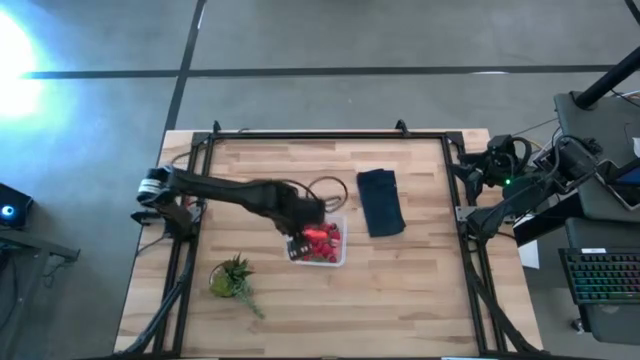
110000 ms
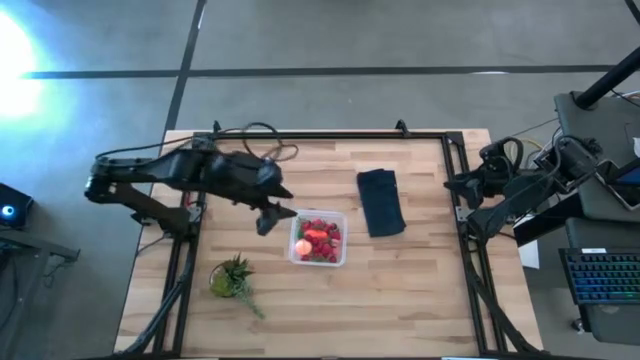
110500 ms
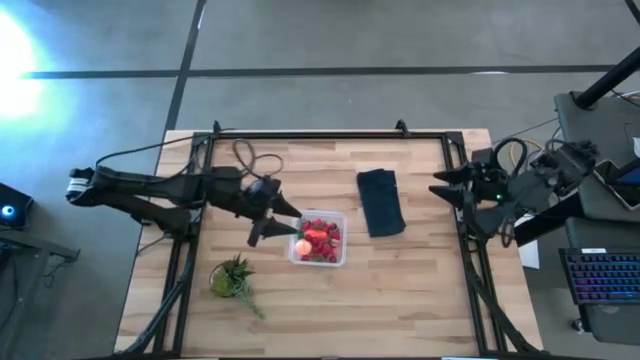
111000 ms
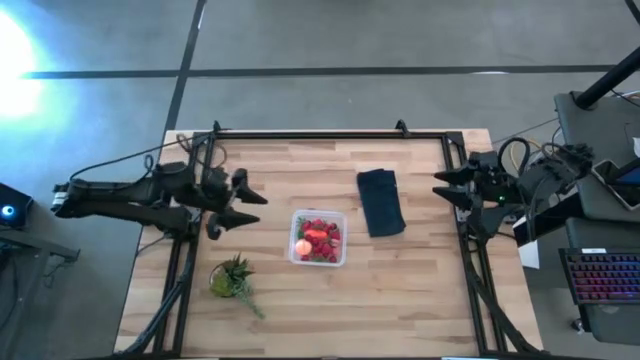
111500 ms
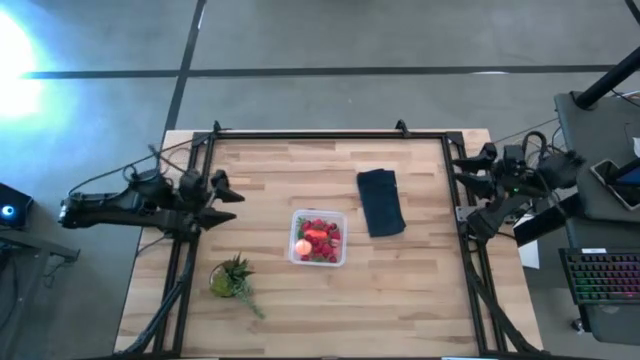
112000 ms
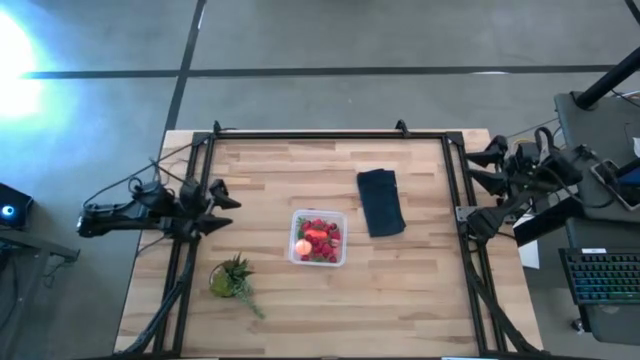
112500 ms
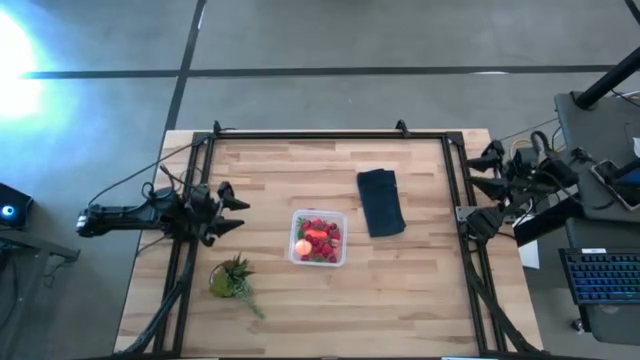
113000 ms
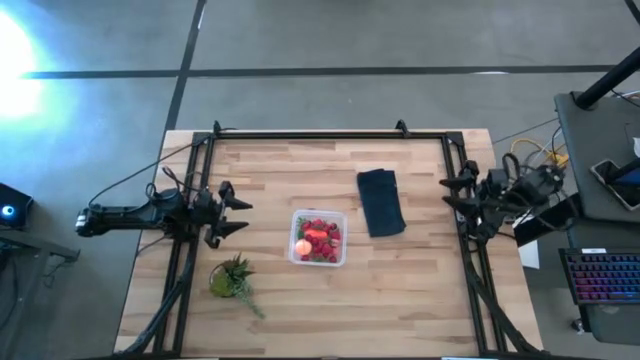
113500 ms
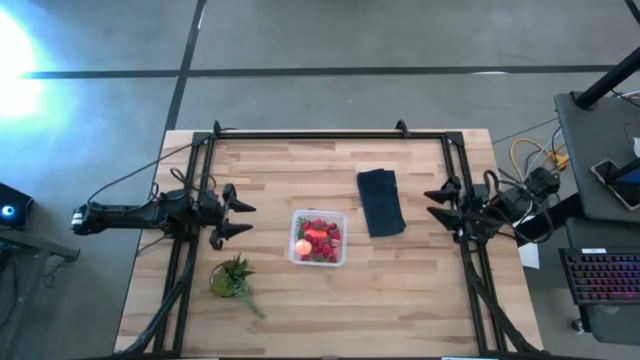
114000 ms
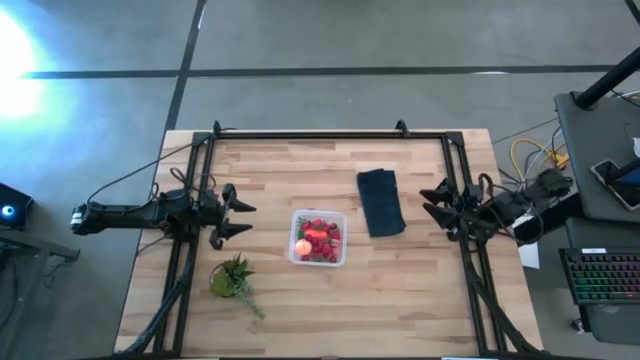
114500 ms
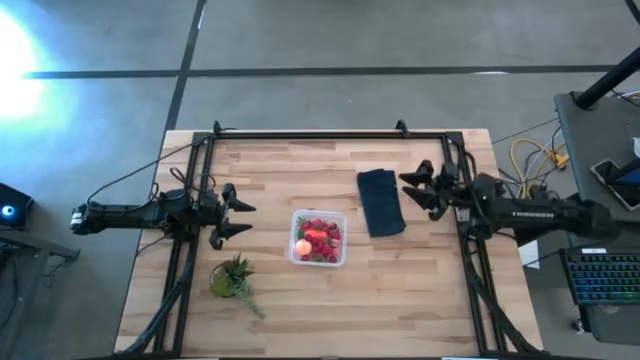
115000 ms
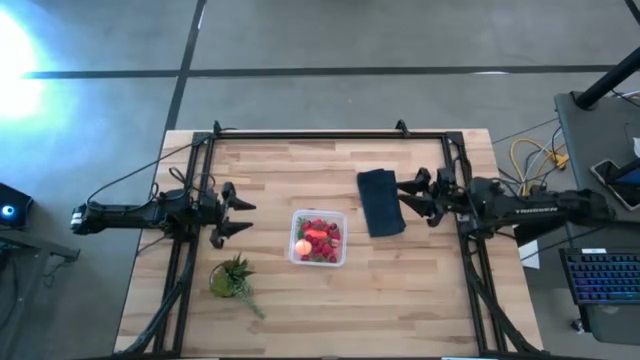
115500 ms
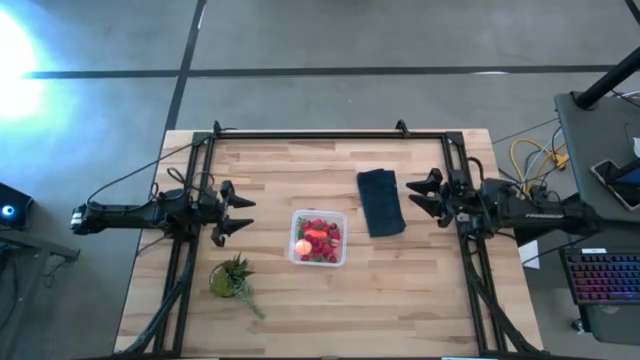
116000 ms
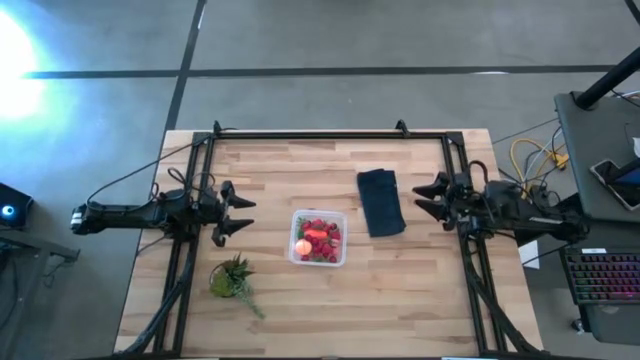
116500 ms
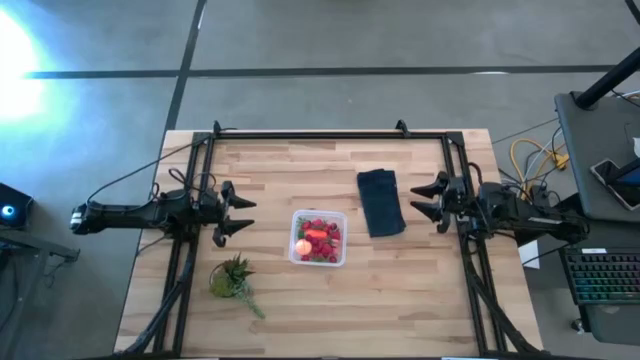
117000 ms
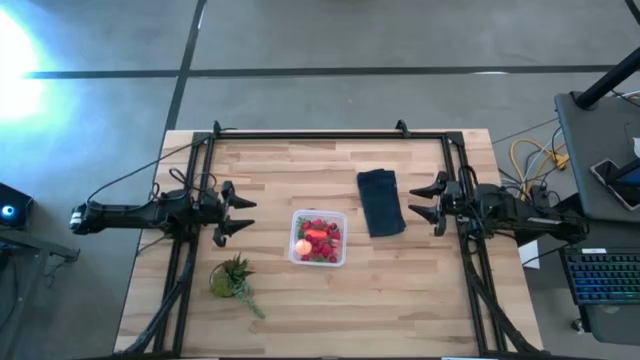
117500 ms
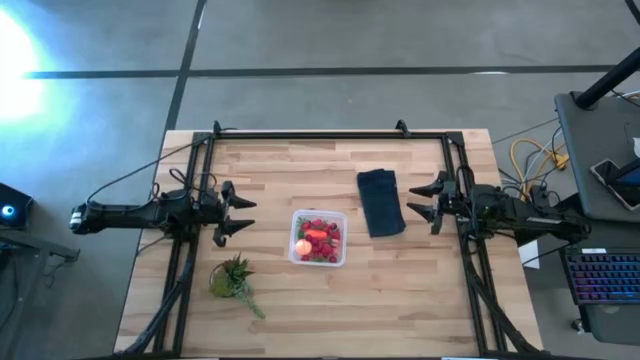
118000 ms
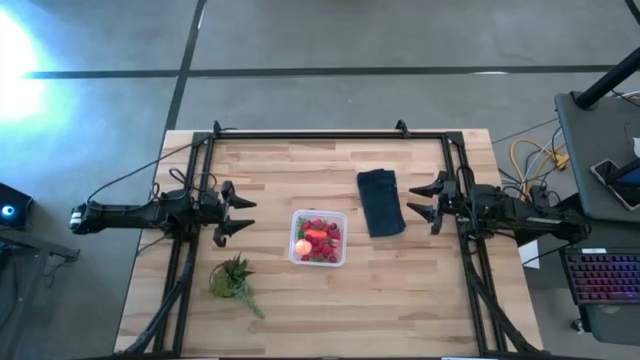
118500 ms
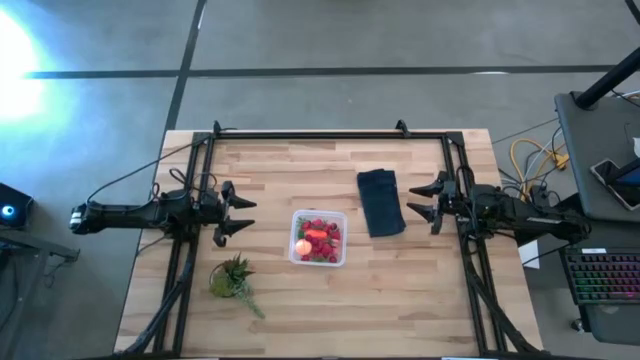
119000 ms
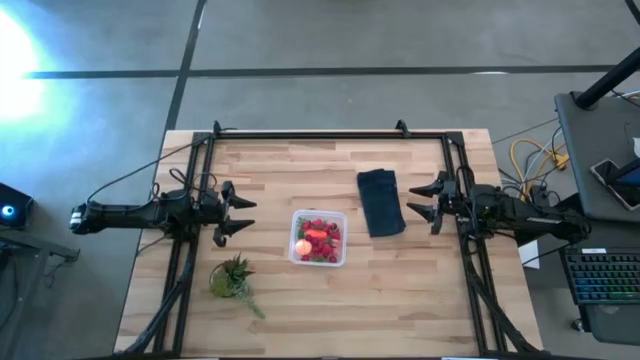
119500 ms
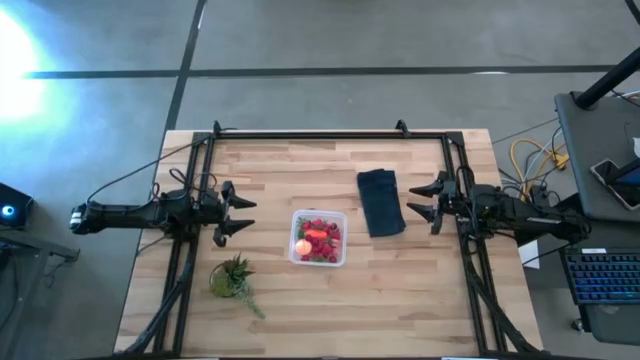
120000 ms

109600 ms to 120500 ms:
Task: Pick and placing Produce into tupperware
Return to Home Position

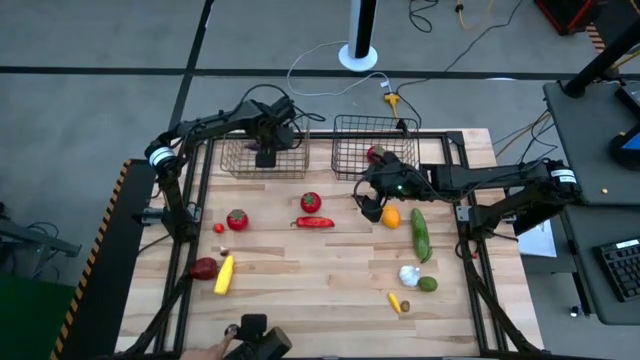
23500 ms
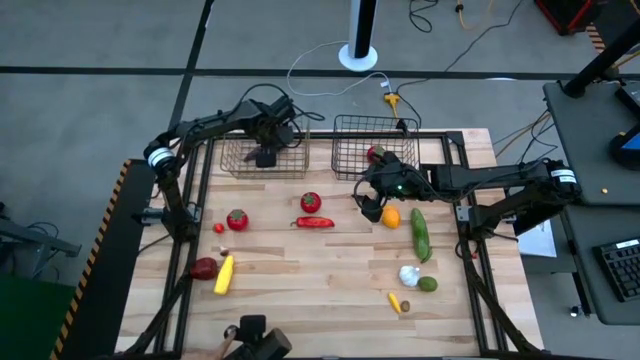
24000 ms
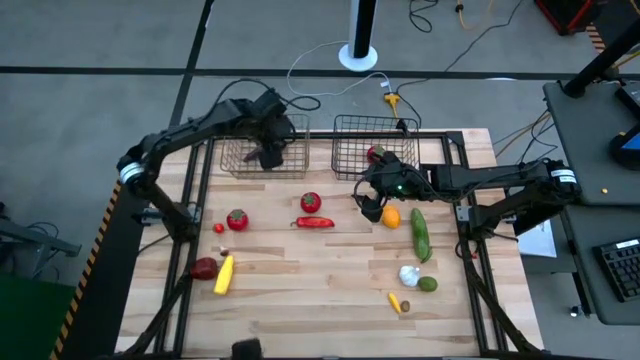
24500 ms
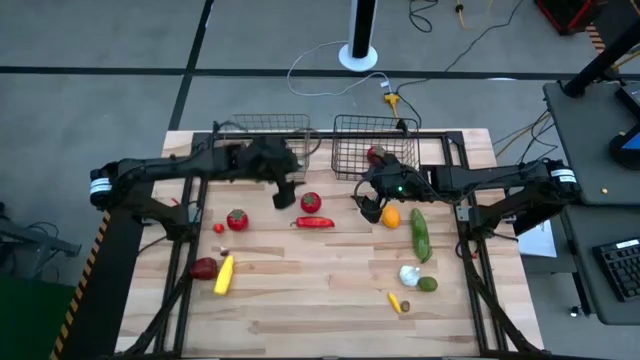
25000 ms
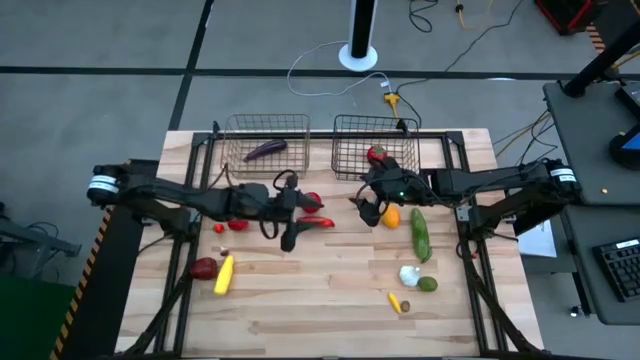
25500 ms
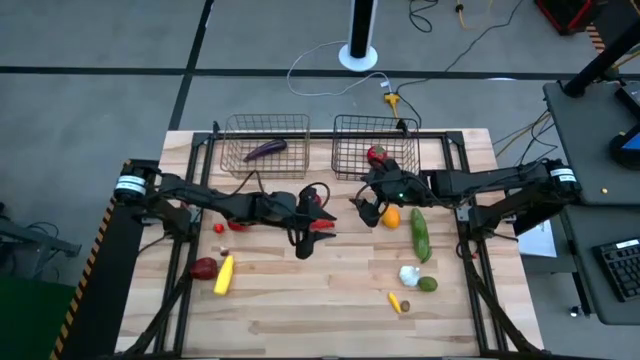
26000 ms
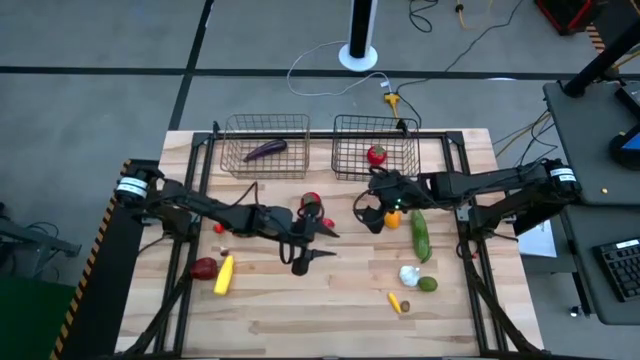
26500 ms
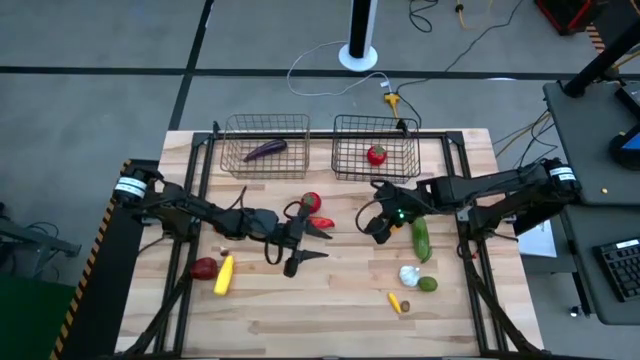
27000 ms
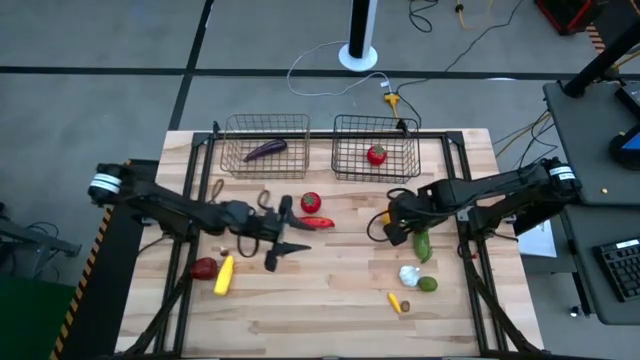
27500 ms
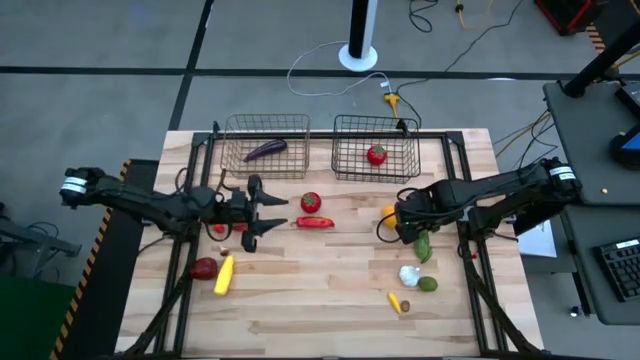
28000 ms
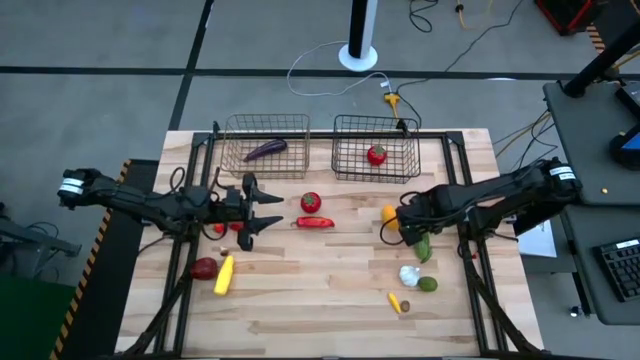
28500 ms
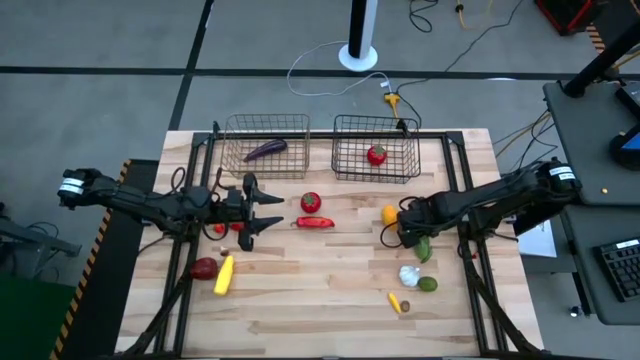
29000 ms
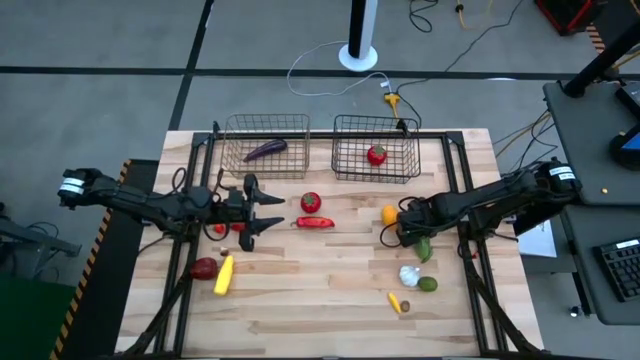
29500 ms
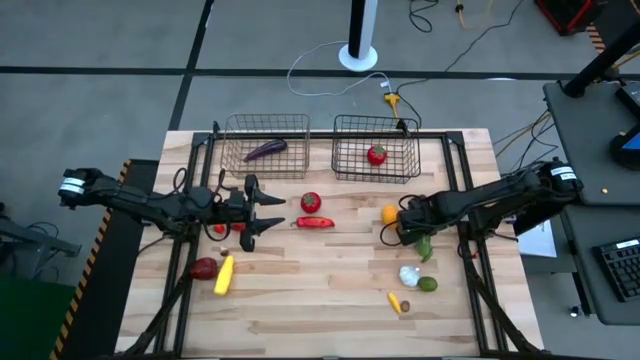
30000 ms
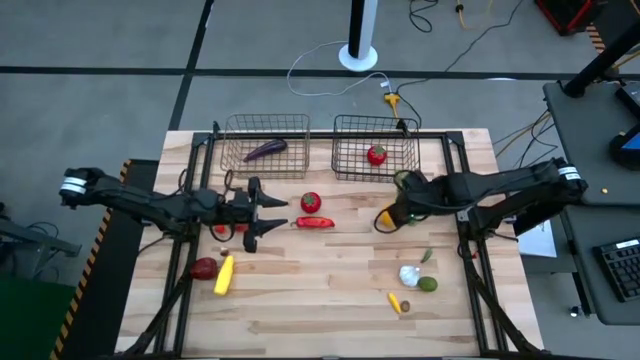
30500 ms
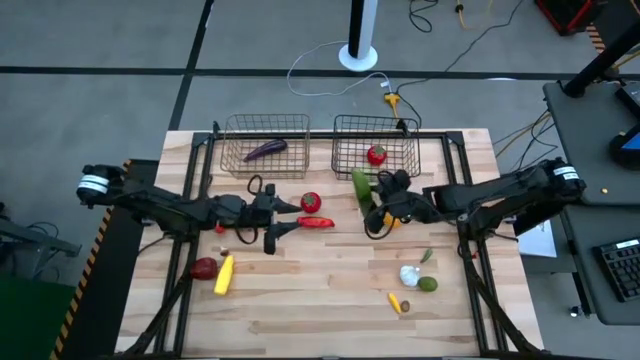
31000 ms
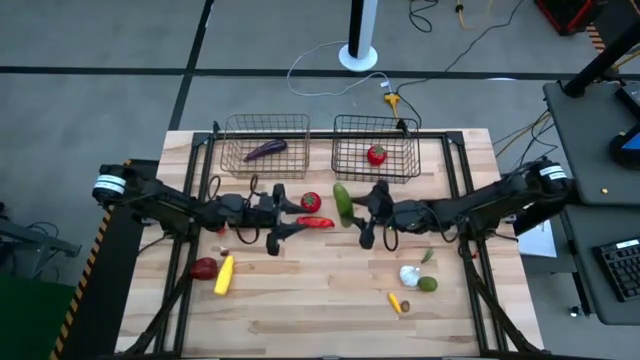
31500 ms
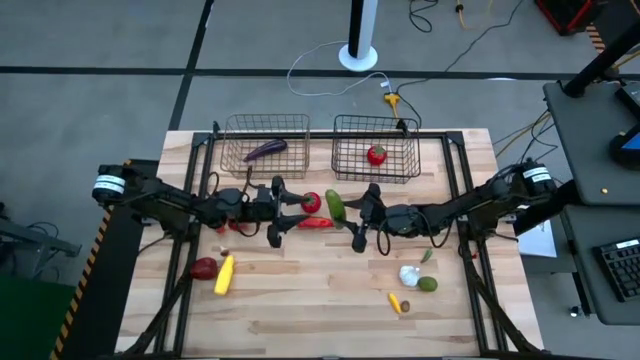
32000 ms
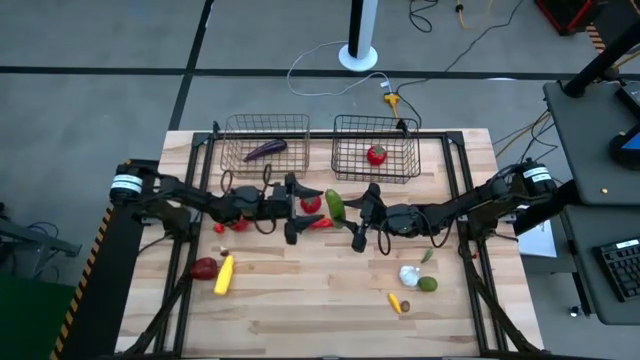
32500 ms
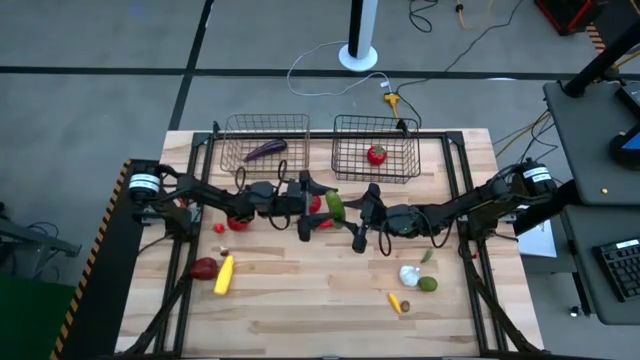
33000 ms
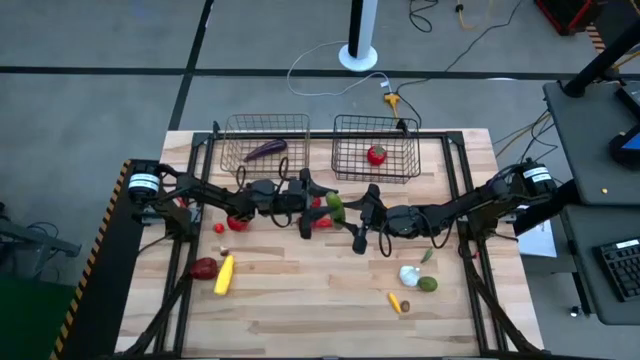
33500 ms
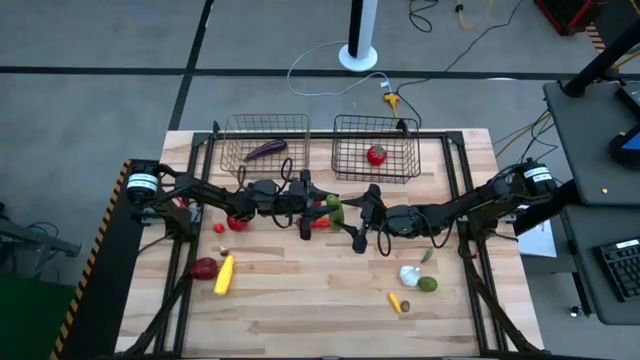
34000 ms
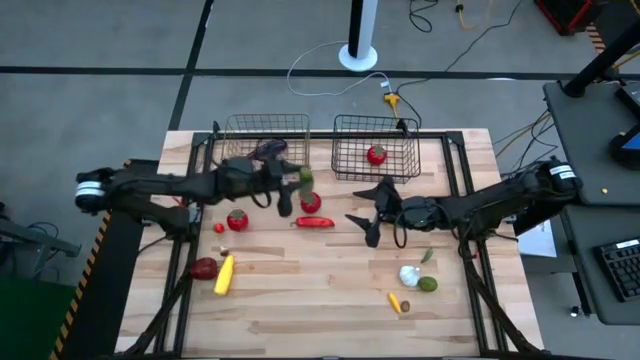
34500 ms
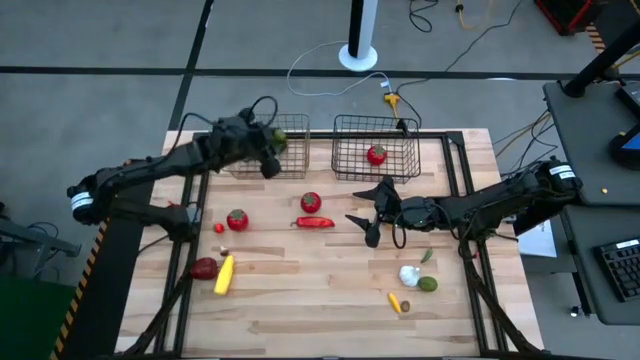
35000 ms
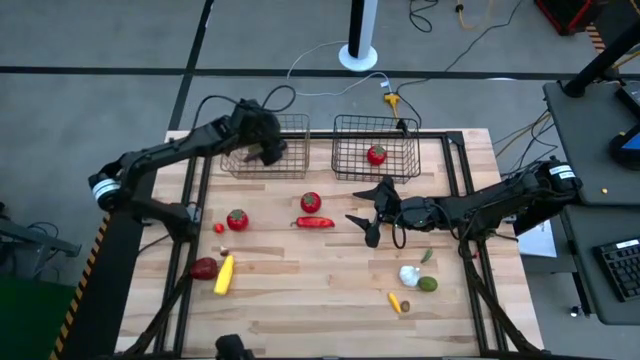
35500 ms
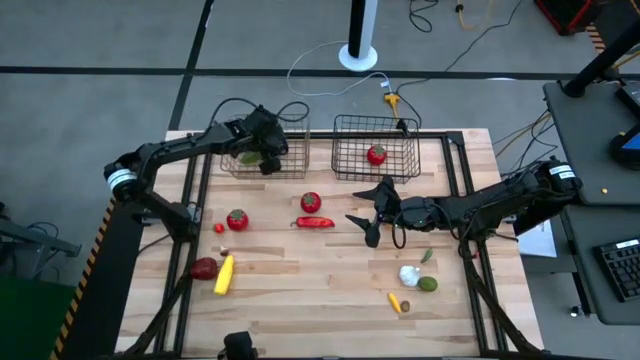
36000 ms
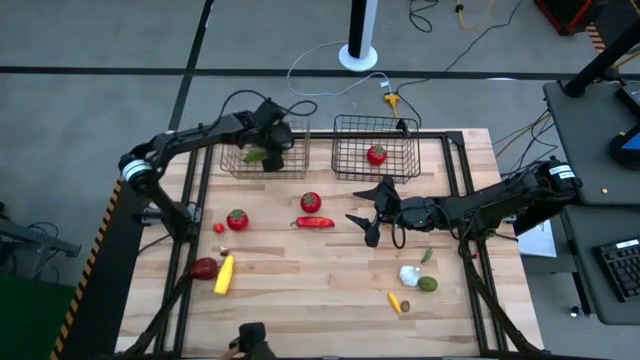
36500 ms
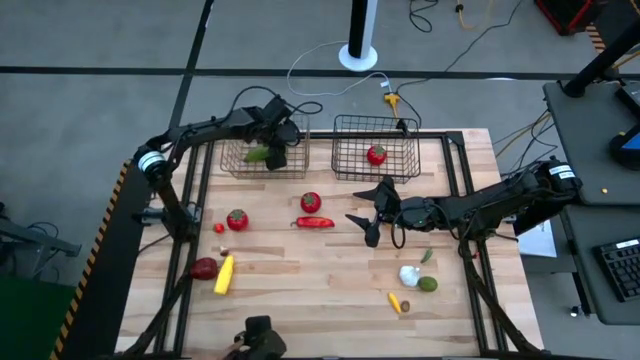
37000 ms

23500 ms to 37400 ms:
Task: Sort produce into baskets
Put the green cucumber into the left wire basket
